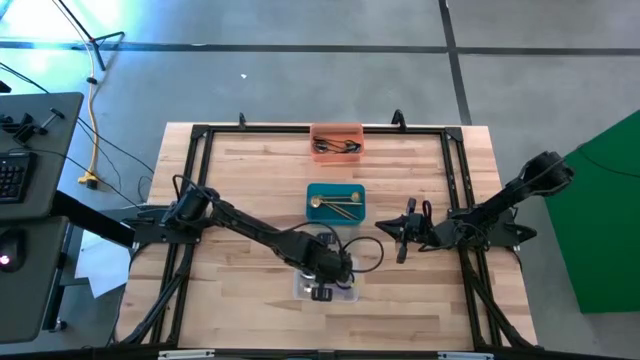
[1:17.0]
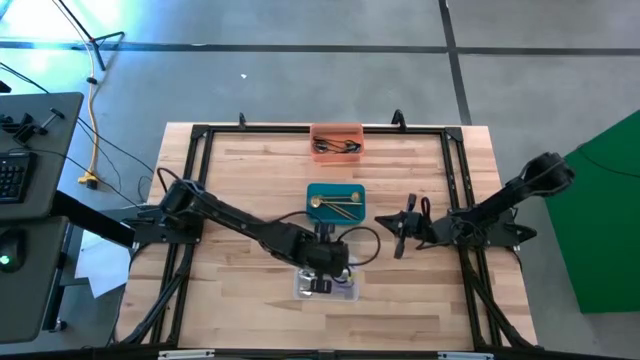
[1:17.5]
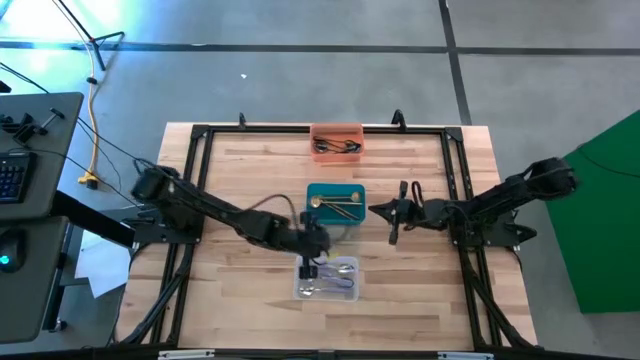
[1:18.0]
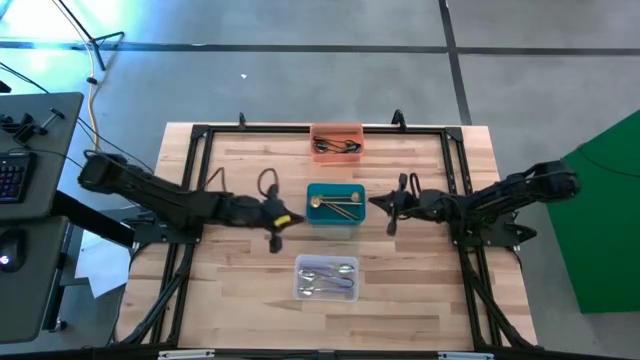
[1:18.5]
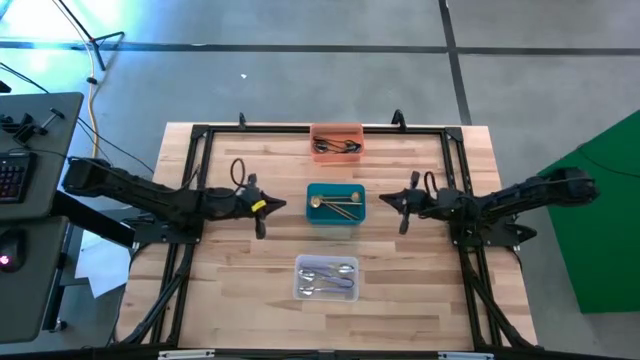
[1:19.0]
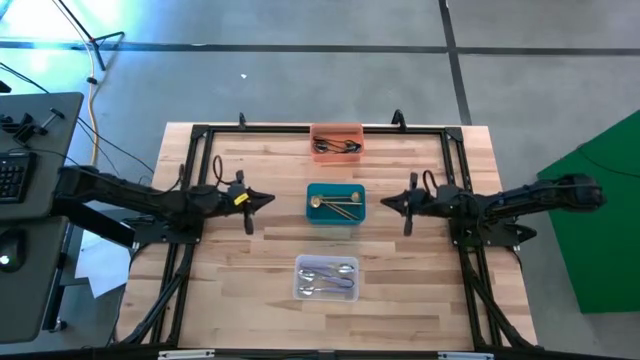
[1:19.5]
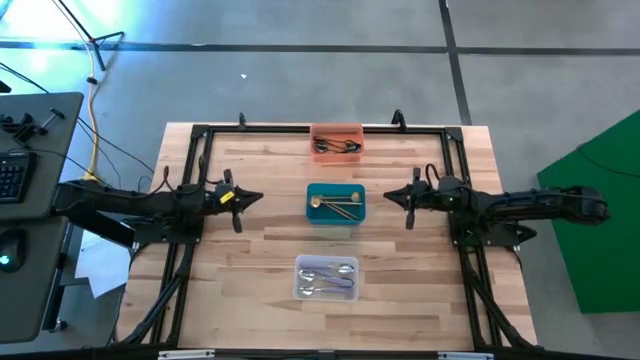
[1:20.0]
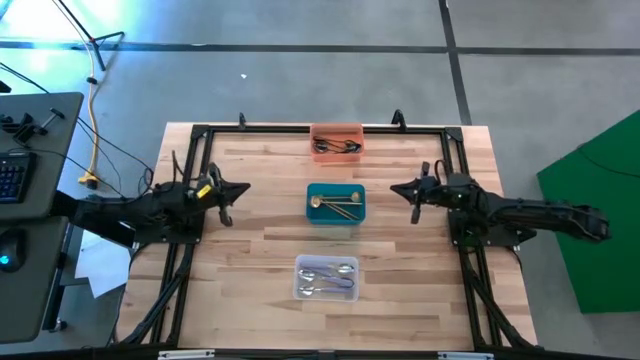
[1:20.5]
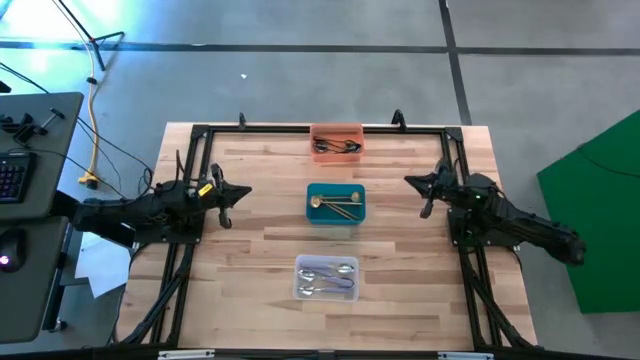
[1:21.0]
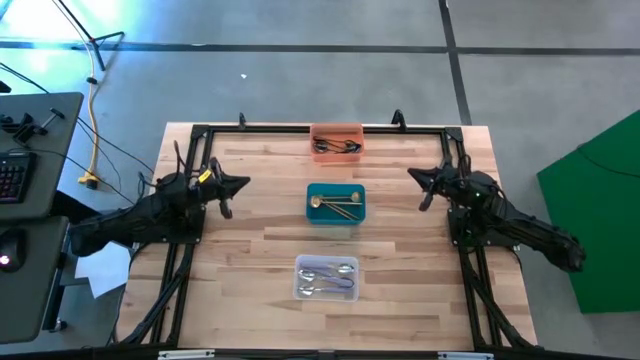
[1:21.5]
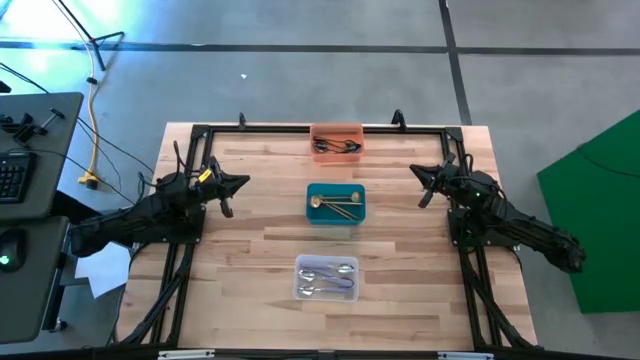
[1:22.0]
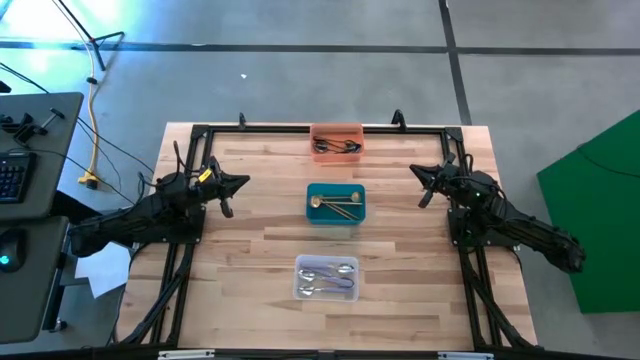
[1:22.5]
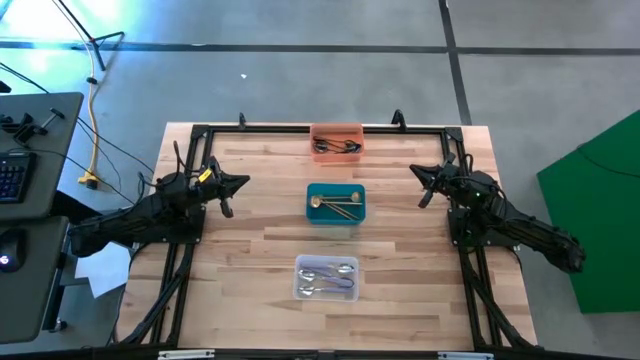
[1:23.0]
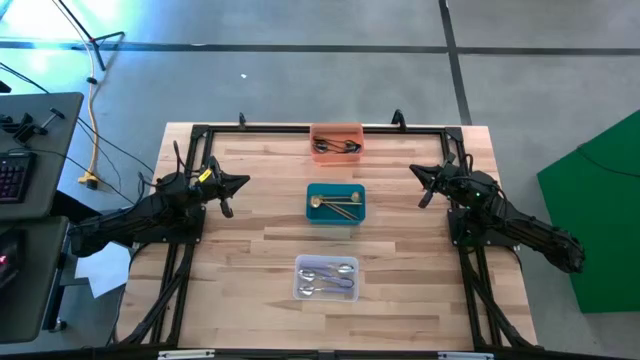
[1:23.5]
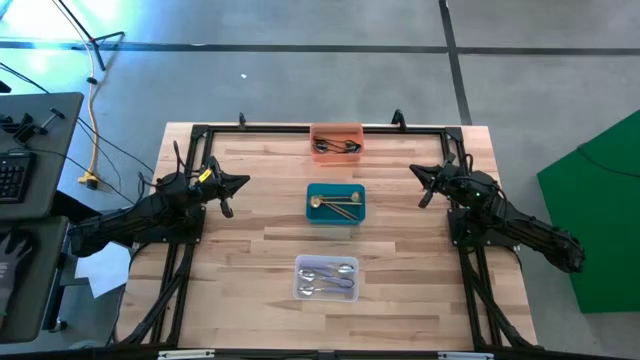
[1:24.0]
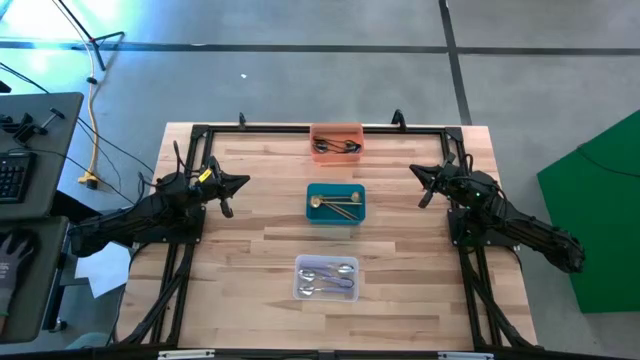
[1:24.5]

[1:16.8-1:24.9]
Task: Sort silverware by color (type)
Return to Home Position

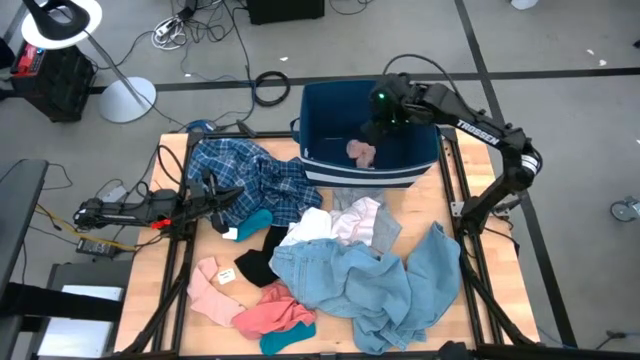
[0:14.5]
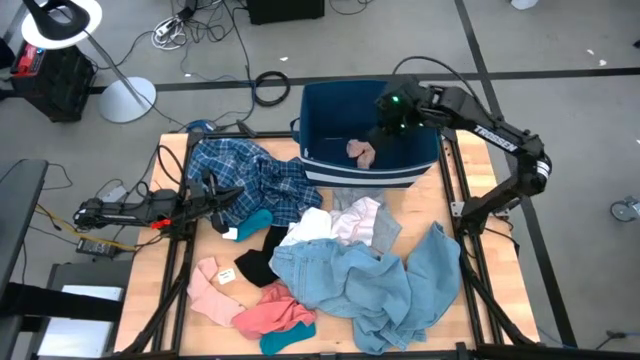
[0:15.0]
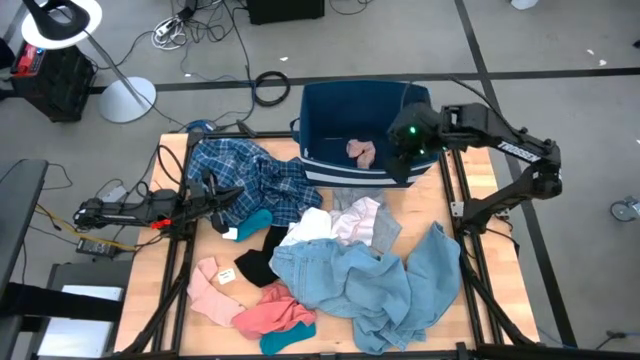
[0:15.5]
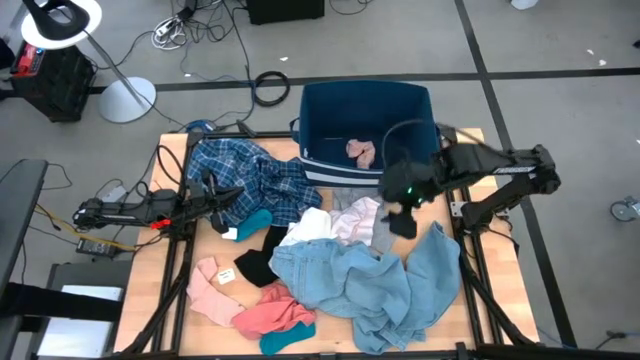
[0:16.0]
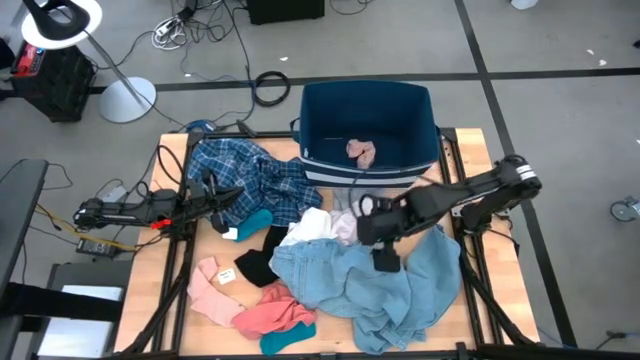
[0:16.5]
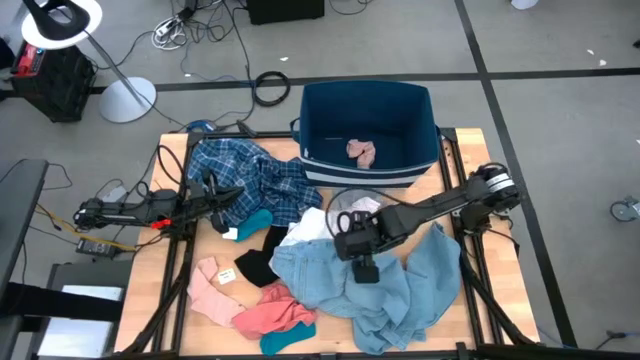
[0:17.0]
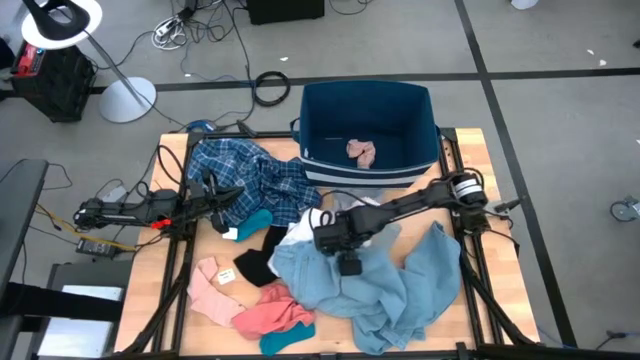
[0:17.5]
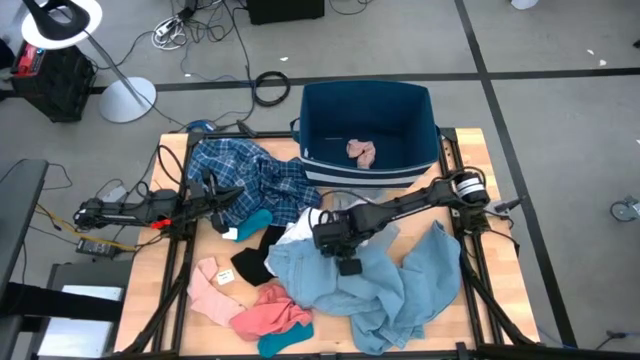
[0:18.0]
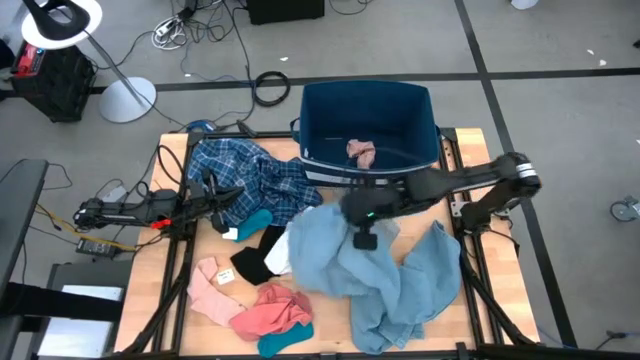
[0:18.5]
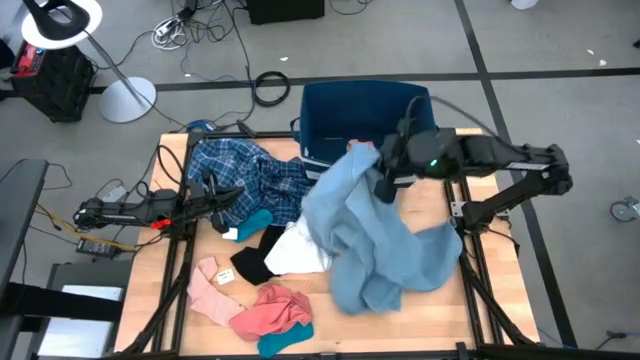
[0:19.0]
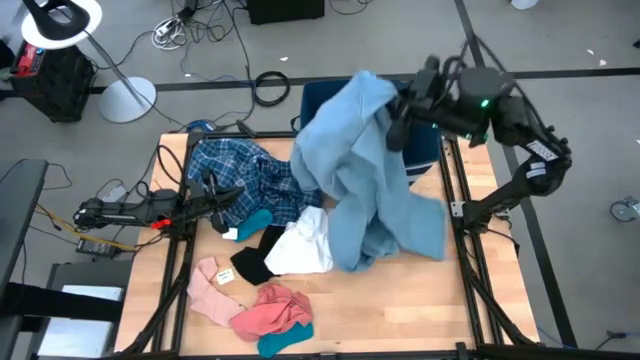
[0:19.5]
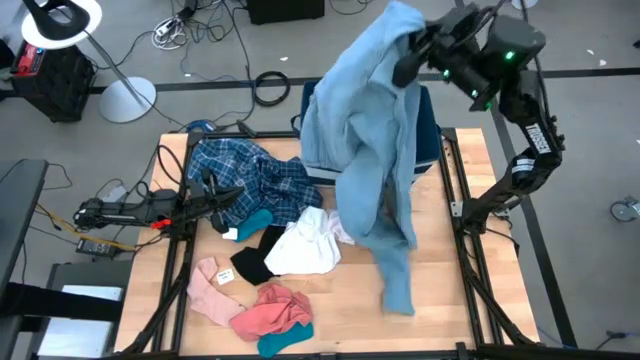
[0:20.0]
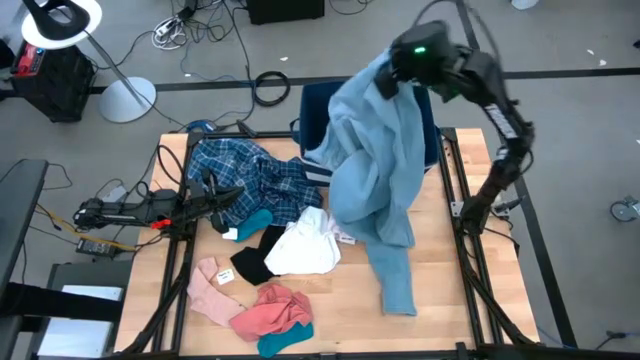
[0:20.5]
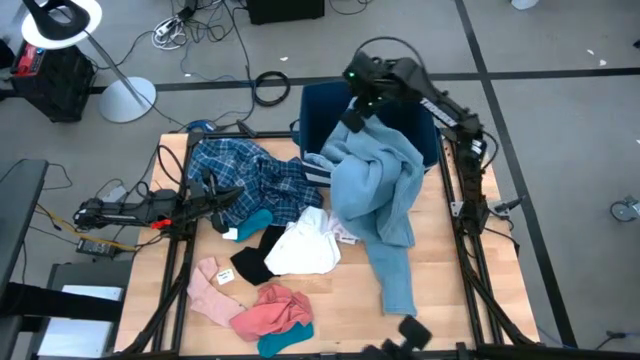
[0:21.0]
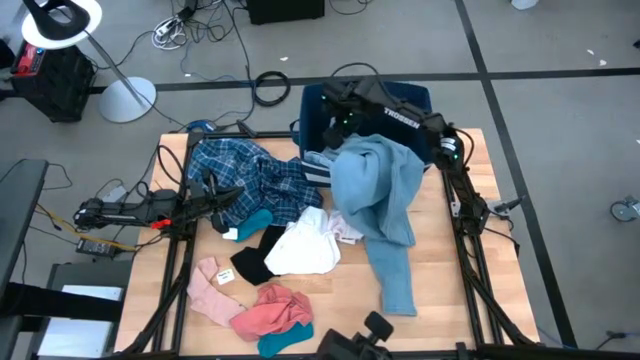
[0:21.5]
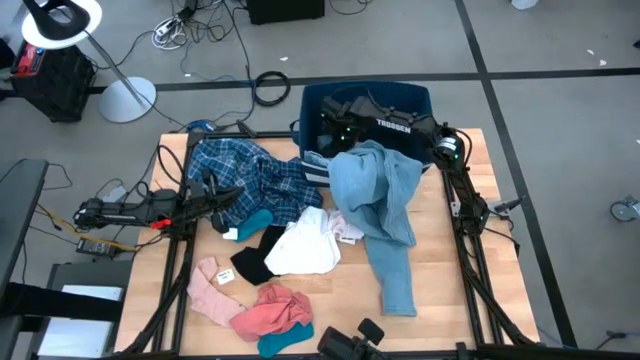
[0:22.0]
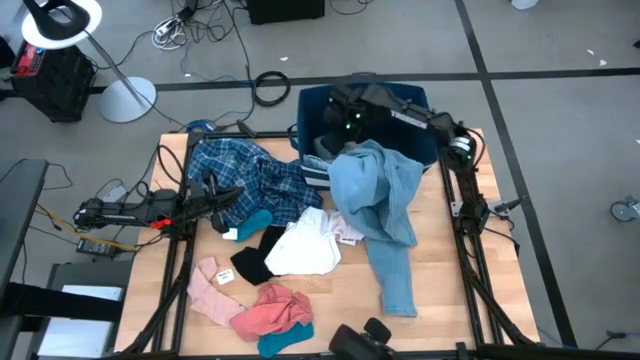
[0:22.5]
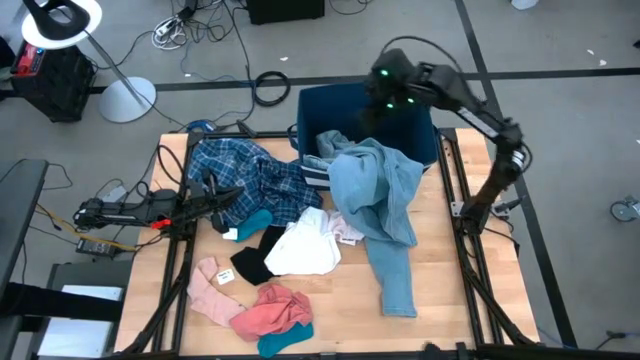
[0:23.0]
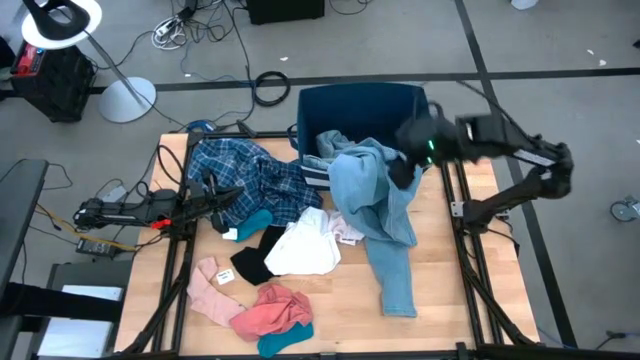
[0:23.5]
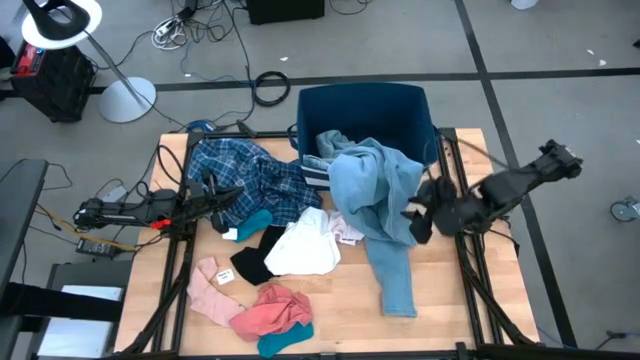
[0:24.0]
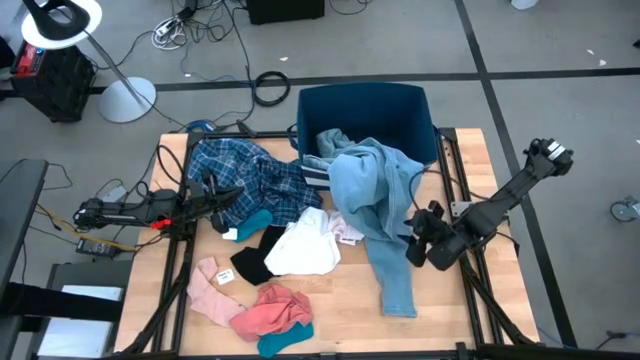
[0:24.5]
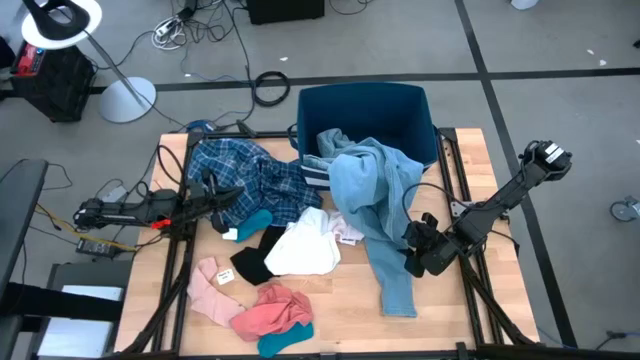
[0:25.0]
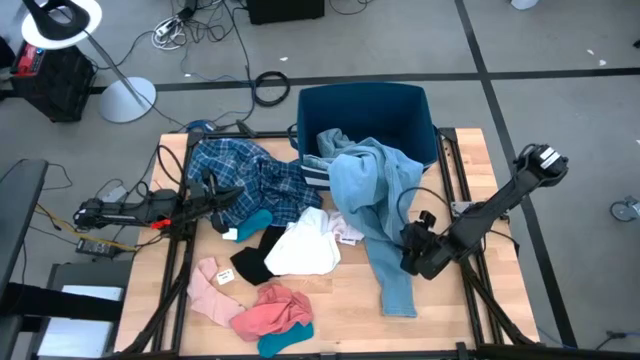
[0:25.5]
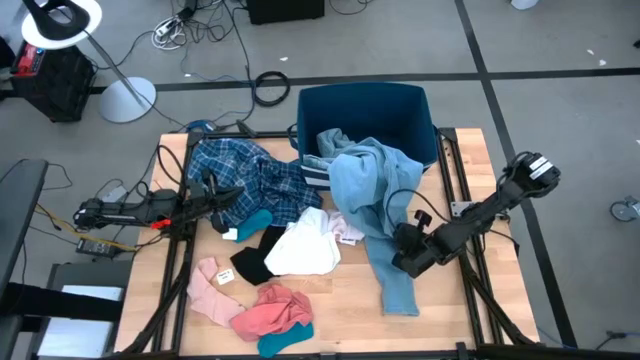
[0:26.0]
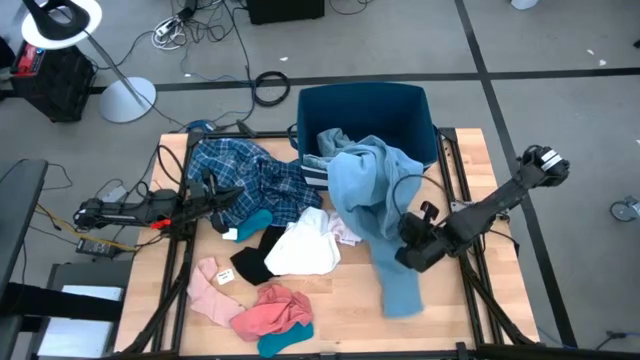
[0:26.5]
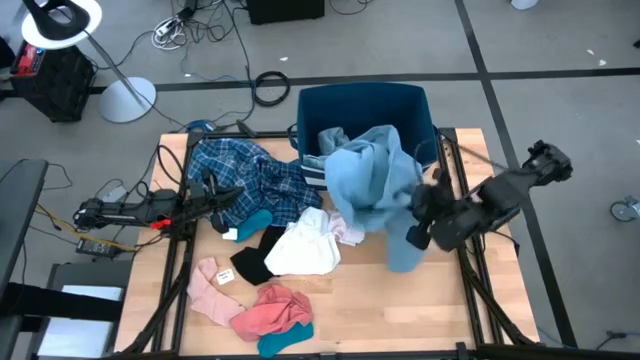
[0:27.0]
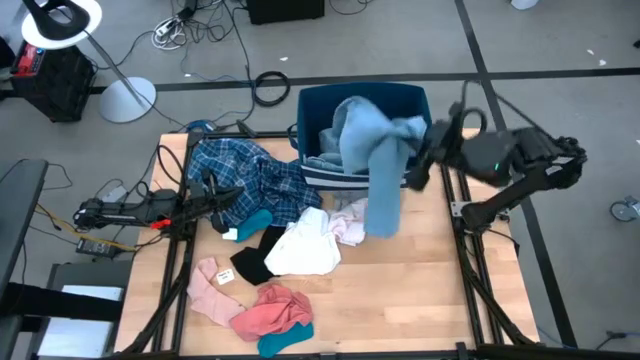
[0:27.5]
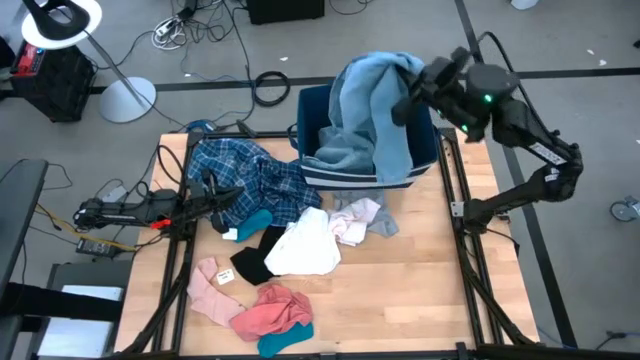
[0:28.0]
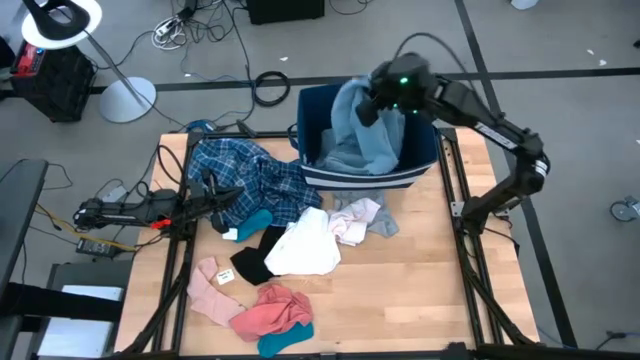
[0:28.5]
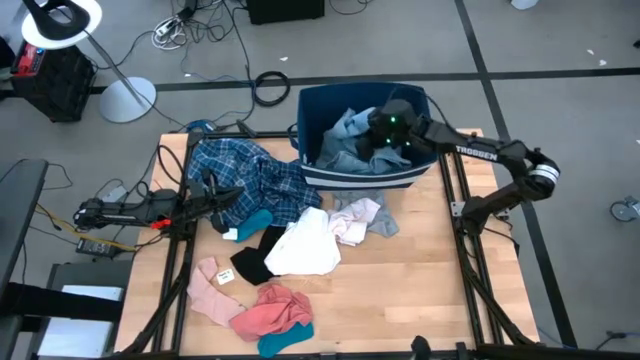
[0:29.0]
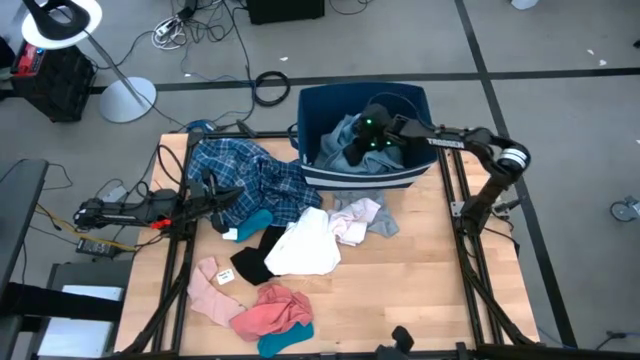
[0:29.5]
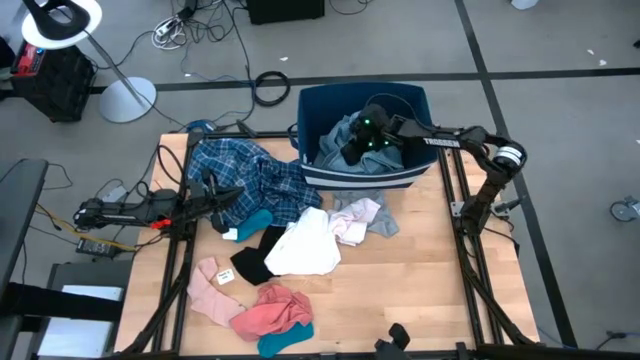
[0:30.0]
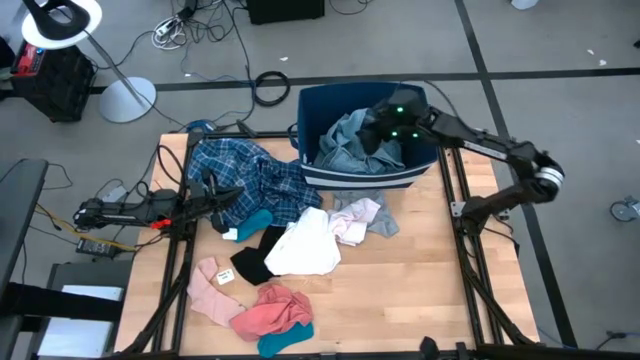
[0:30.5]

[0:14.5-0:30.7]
Task: Sort clothes
Put the blue pants into the blue bin
